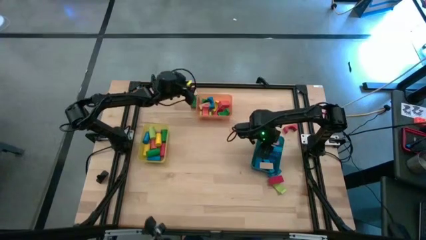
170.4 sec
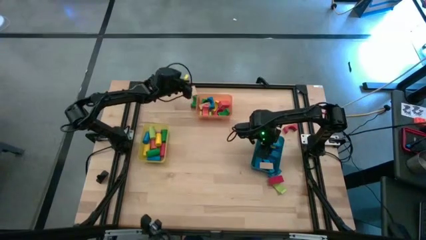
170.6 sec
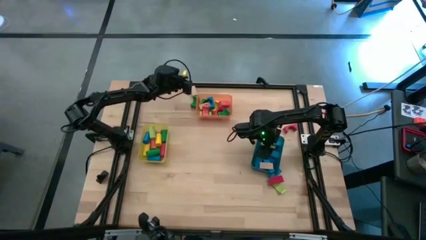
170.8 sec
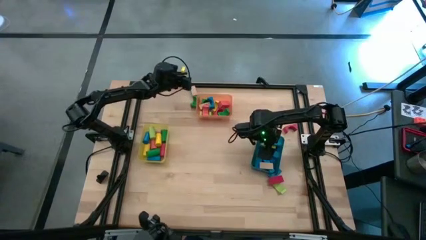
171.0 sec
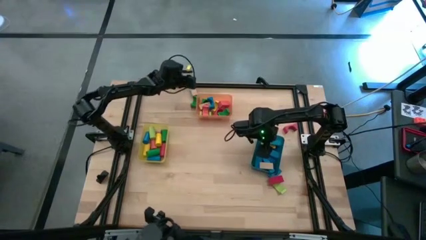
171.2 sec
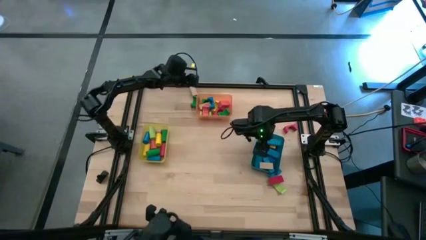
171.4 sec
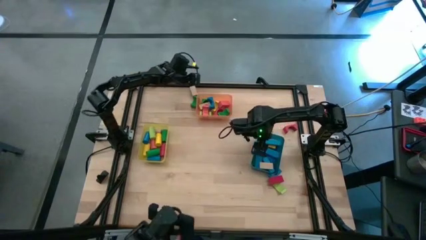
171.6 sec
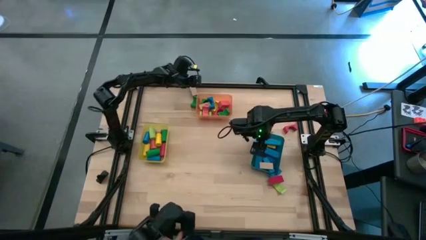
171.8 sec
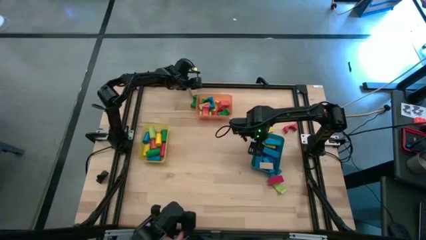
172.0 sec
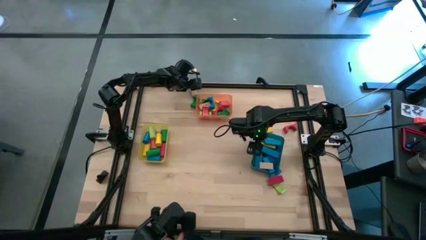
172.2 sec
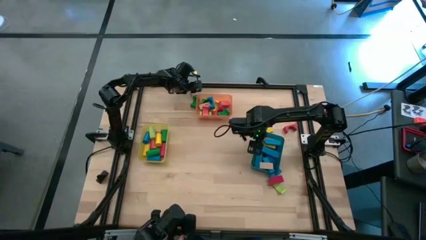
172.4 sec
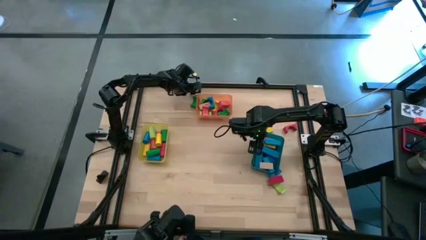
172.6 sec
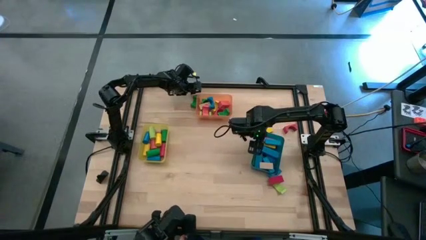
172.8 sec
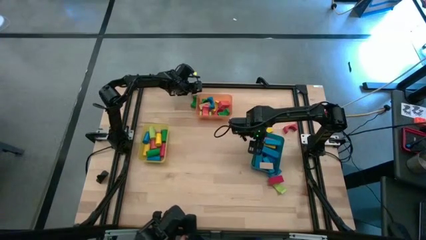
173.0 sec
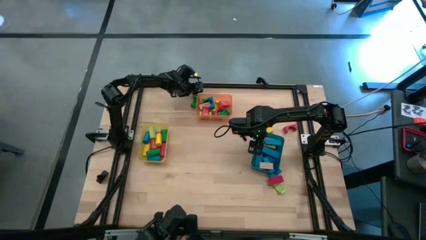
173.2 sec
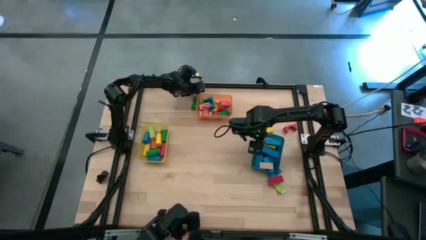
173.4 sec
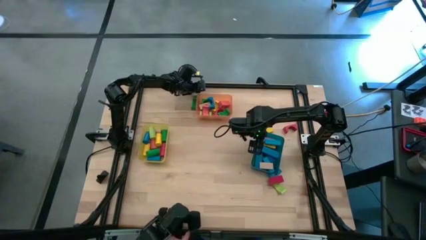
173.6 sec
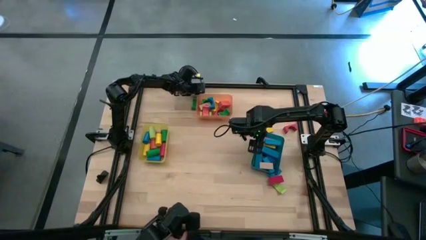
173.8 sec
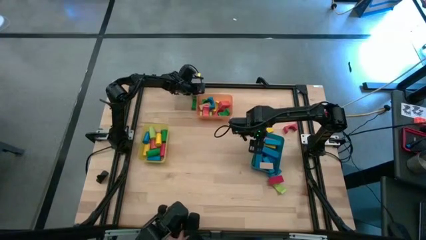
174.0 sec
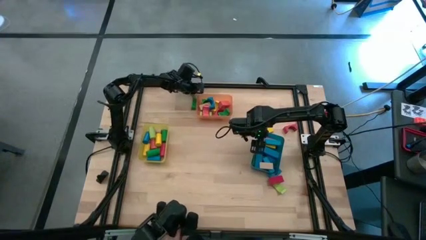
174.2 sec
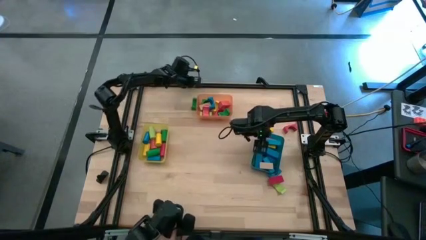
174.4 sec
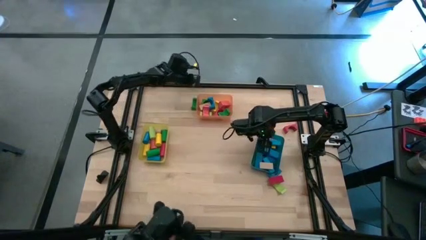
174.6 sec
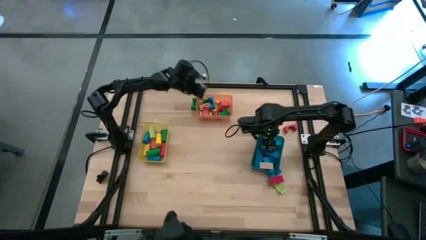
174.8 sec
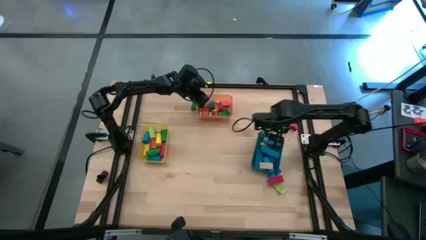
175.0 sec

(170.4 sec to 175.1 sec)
Task: Sort blocks by size
Put the brown arch block into the orange bin

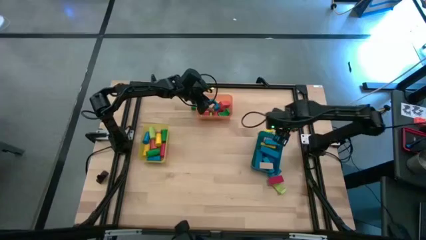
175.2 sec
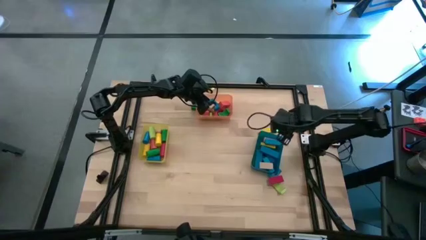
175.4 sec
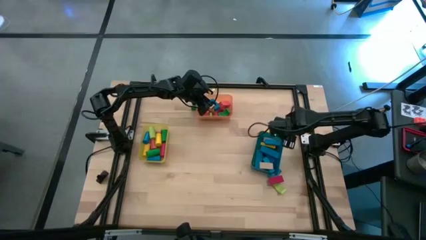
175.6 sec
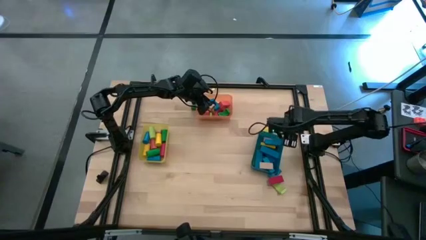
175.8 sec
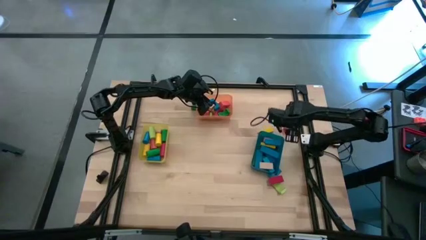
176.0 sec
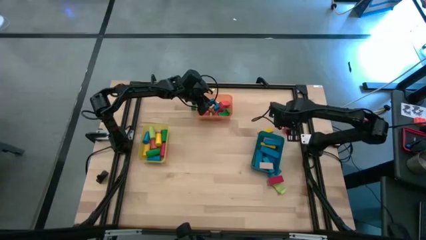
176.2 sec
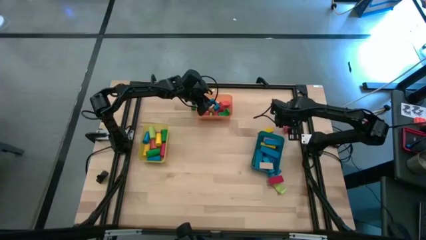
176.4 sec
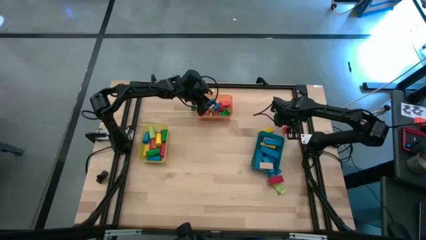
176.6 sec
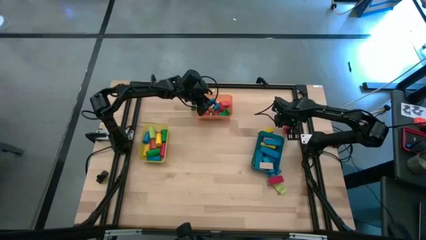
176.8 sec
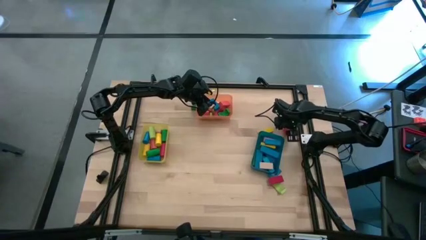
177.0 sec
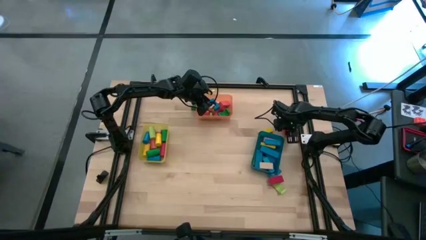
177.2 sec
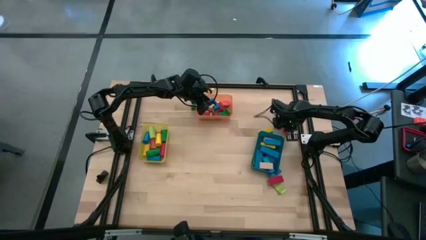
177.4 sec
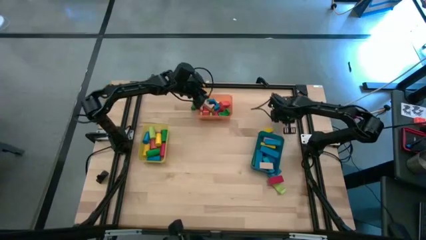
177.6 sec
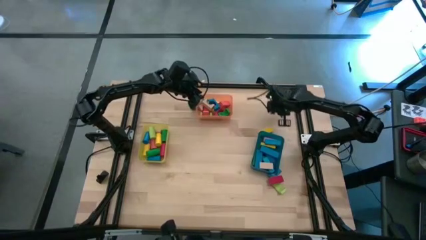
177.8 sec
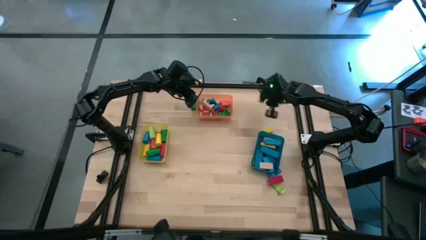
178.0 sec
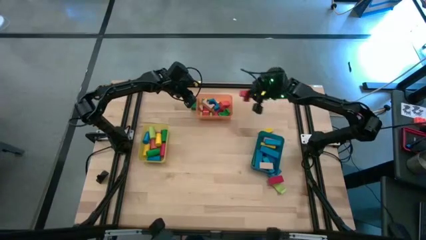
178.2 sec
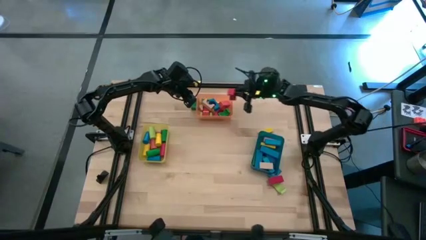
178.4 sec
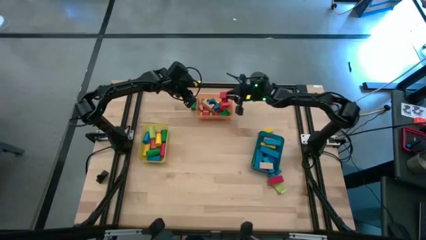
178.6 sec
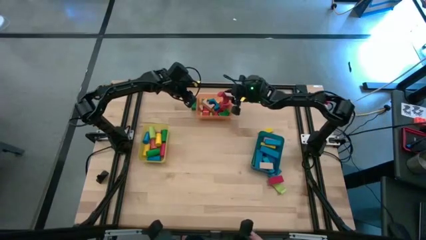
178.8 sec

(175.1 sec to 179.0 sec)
Put the red arch block into the orange bin

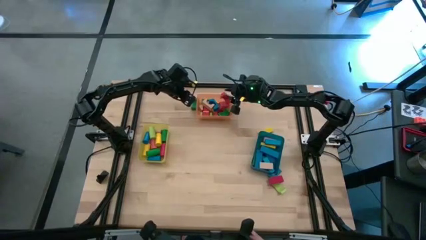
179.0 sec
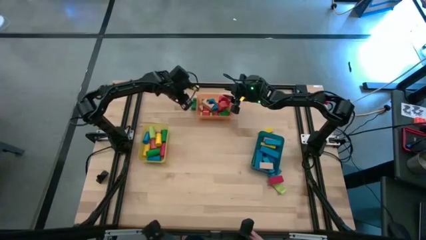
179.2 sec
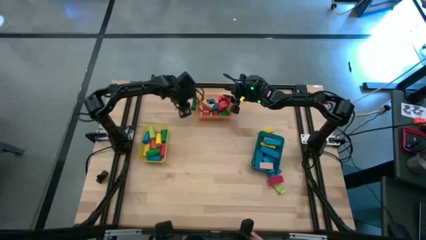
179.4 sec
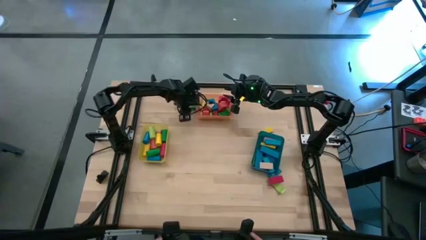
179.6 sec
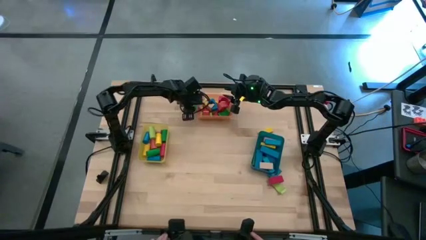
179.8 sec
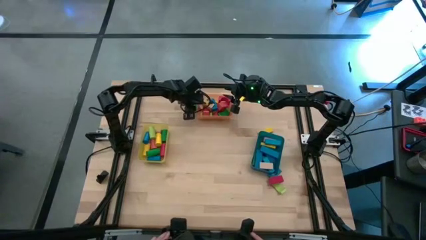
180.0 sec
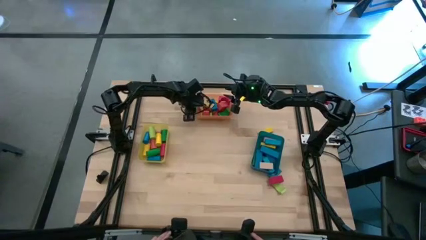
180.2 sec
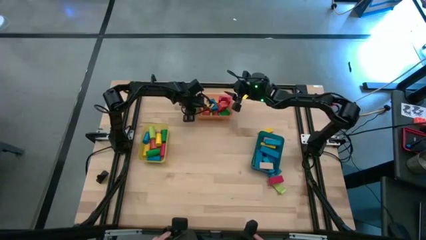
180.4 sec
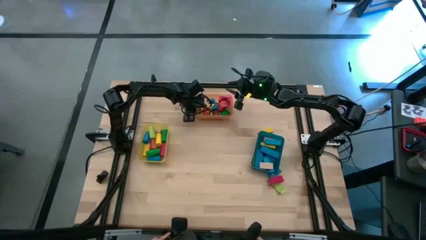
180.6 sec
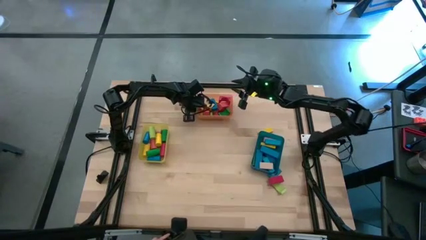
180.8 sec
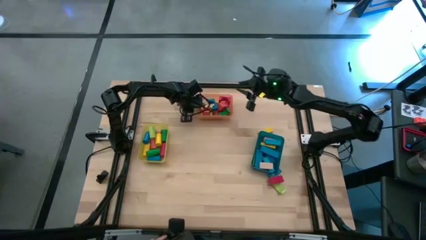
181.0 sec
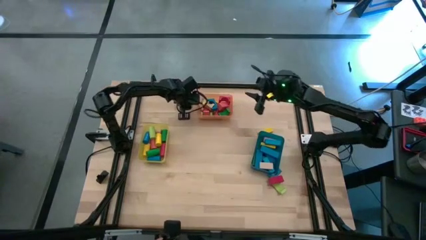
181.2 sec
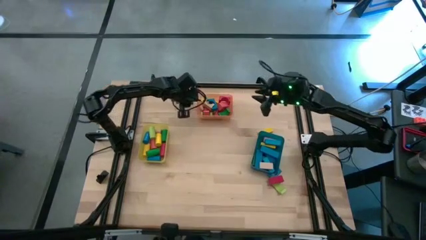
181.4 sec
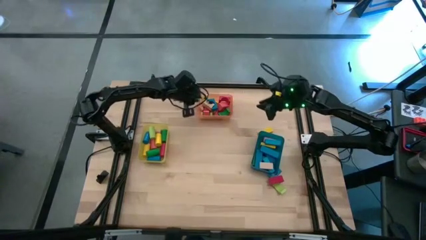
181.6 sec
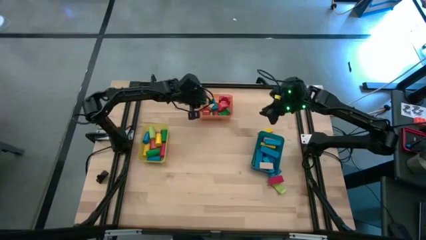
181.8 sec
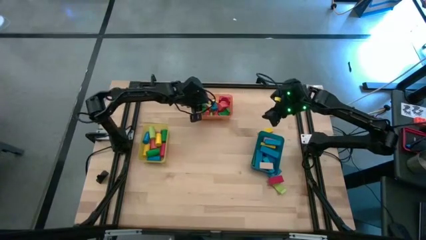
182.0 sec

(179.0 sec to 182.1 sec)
Put the green arch block into the orange bin

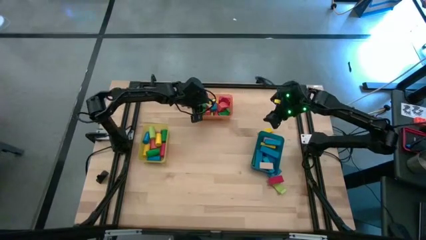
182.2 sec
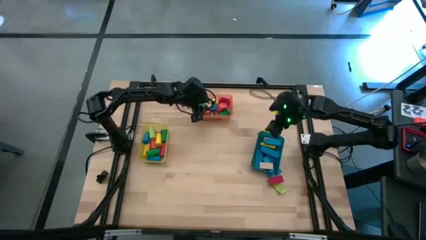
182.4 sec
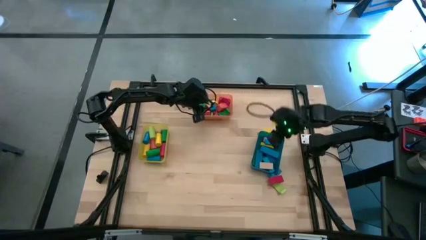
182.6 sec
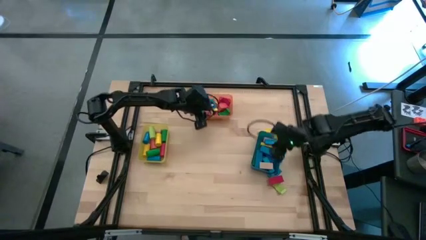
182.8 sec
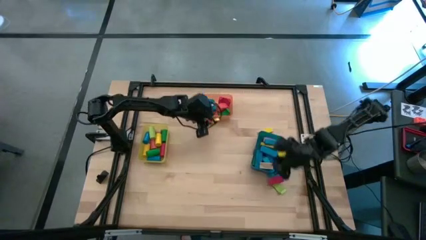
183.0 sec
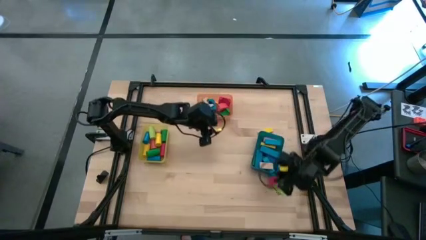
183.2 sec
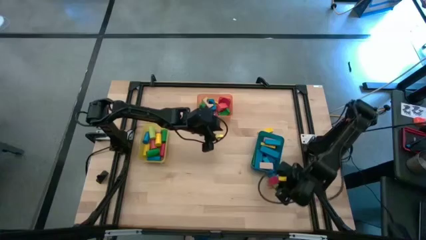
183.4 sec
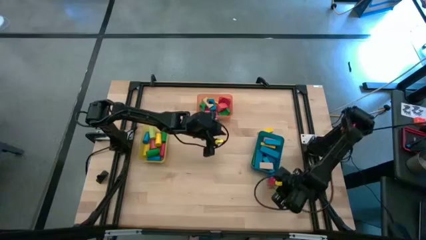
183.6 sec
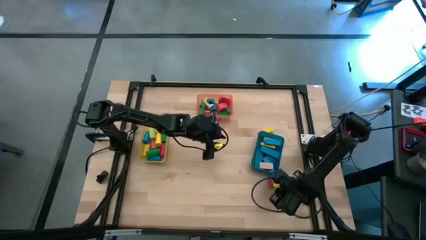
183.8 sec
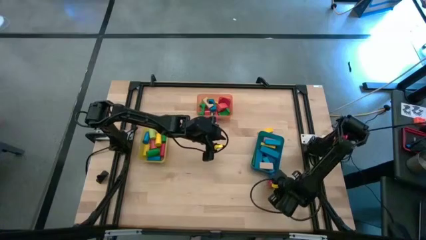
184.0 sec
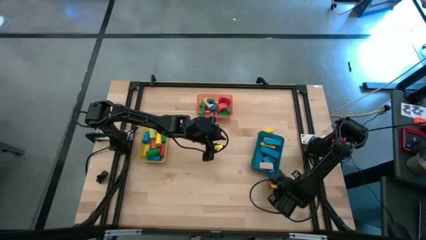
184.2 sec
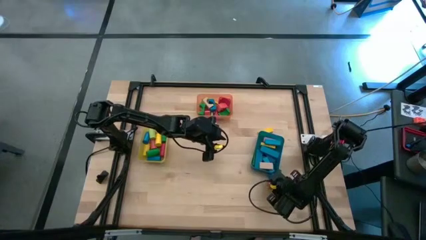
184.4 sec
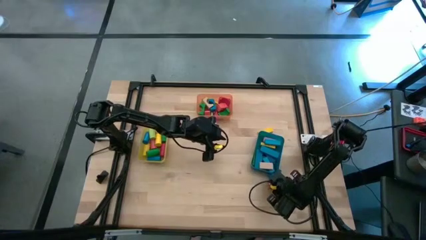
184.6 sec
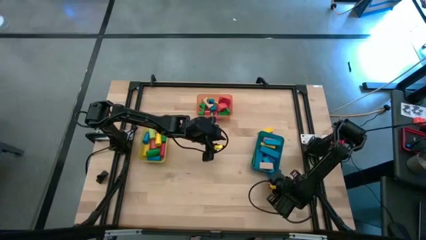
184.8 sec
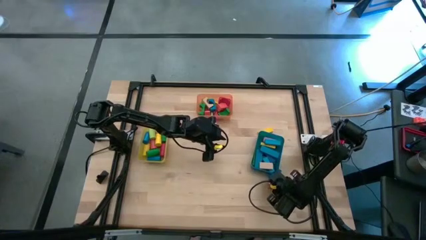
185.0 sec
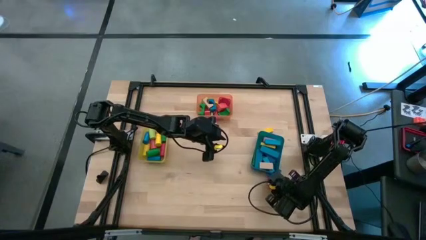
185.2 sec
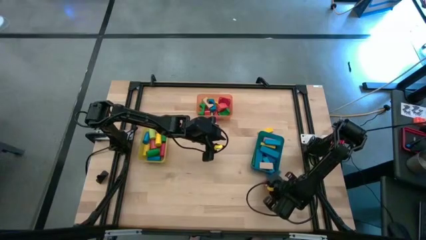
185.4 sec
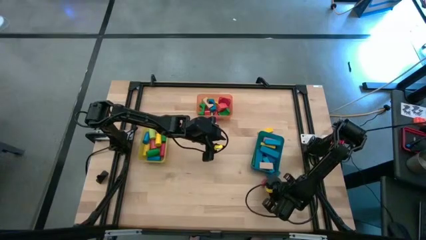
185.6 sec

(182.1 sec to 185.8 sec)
Put the light green arch block into the orange bin

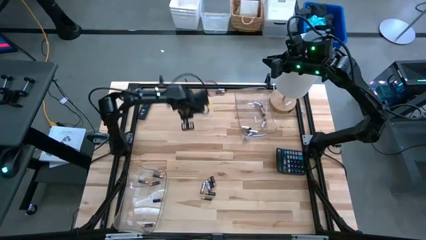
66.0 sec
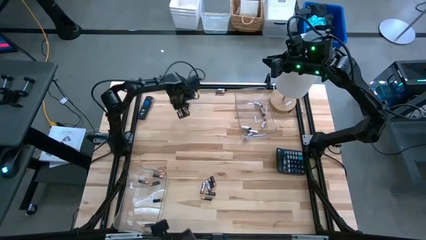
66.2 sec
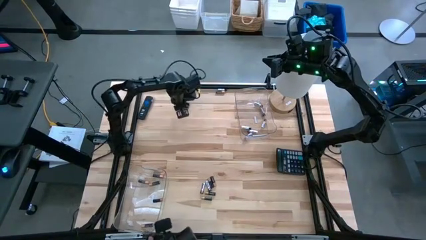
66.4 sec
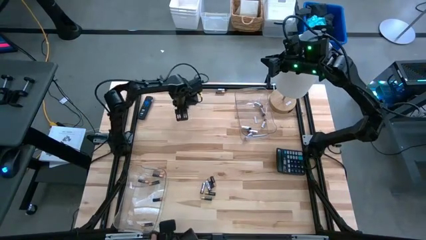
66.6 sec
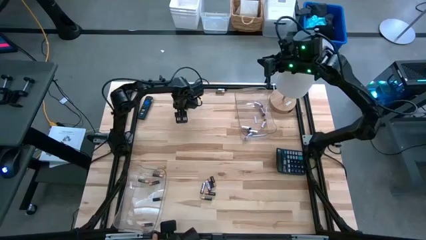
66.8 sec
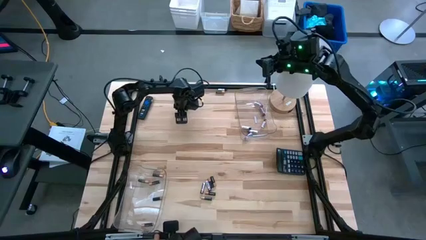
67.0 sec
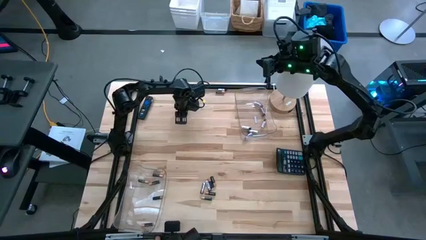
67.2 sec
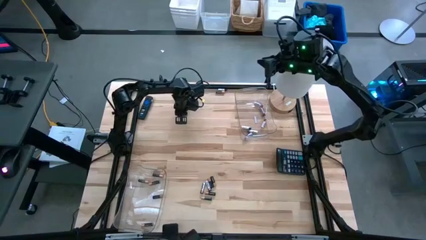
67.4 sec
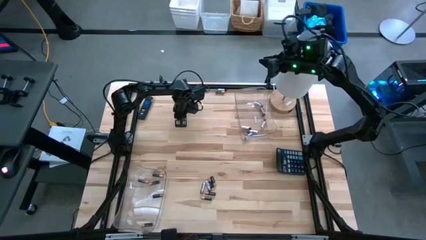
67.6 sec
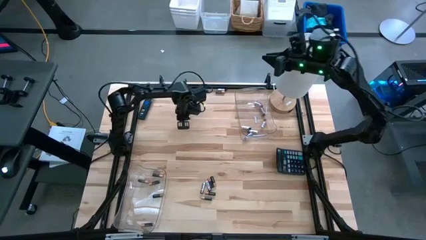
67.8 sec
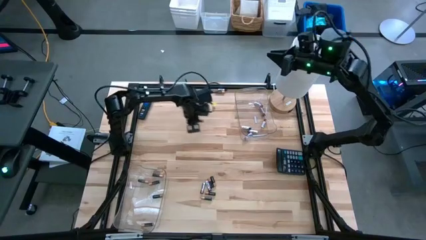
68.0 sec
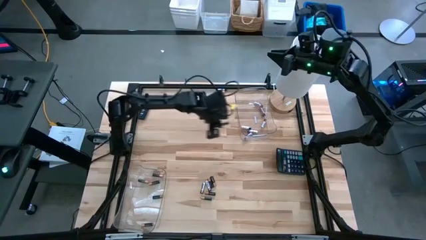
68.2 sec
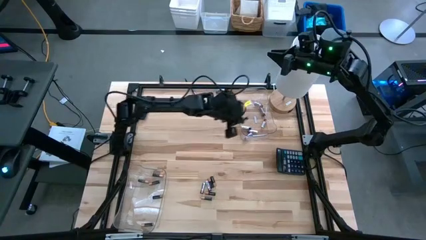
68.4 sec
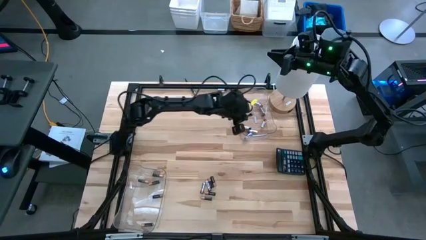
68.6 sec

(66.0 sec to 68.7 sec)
Task: Sort batteries
Put the silver battery into the right transparent bin
